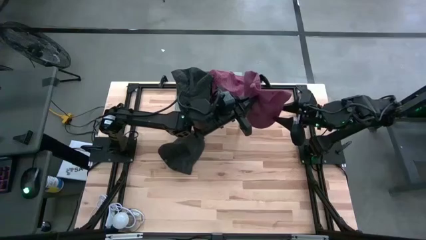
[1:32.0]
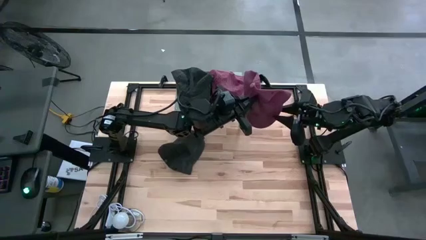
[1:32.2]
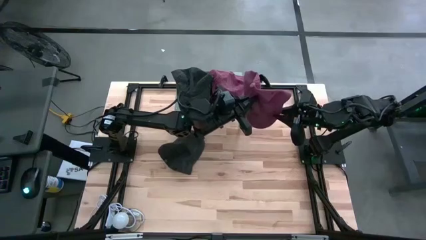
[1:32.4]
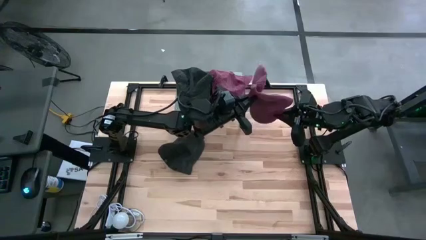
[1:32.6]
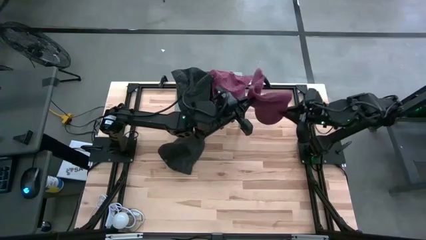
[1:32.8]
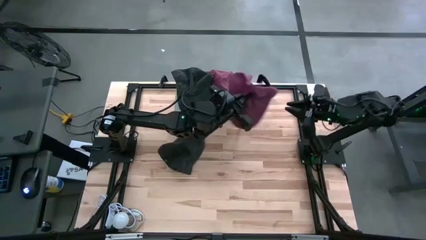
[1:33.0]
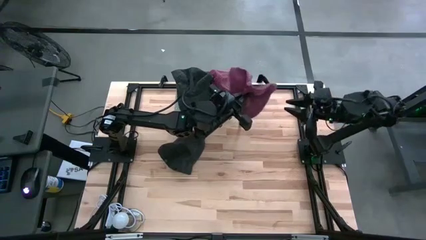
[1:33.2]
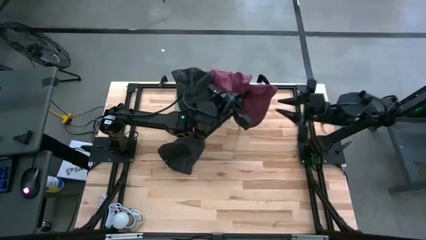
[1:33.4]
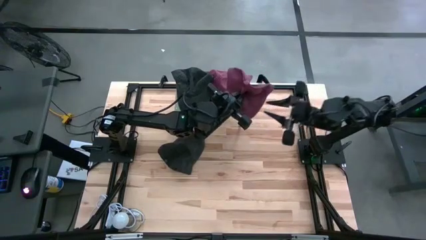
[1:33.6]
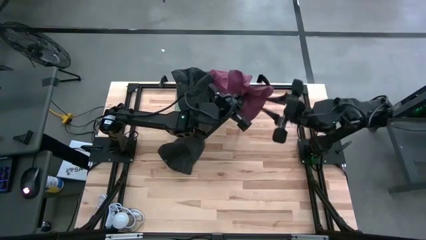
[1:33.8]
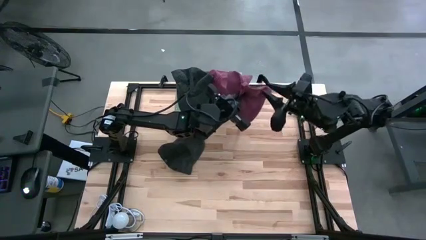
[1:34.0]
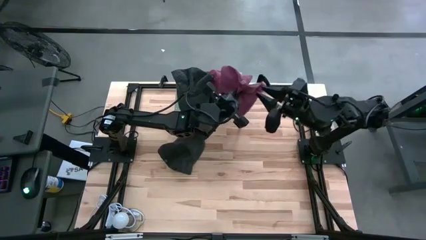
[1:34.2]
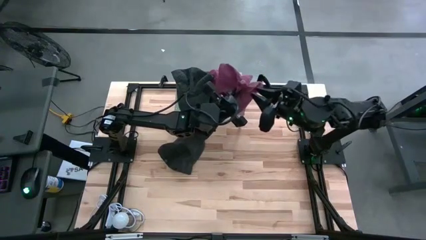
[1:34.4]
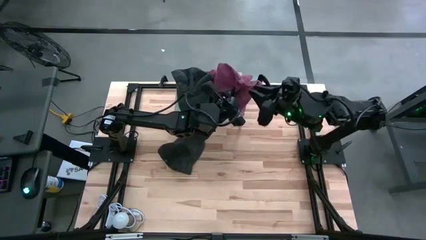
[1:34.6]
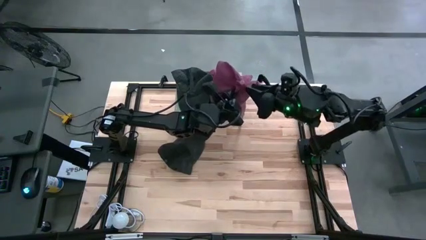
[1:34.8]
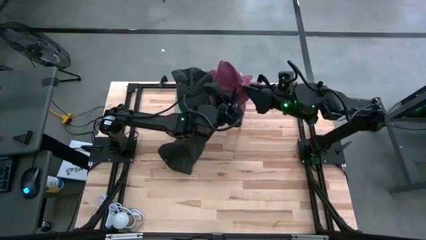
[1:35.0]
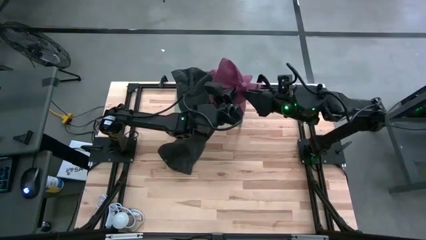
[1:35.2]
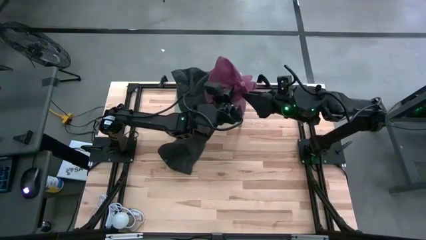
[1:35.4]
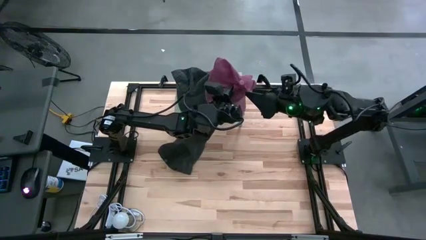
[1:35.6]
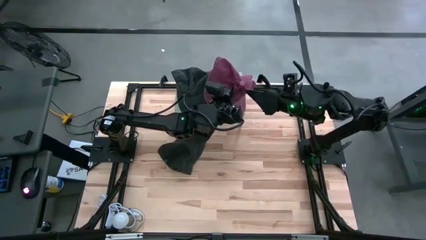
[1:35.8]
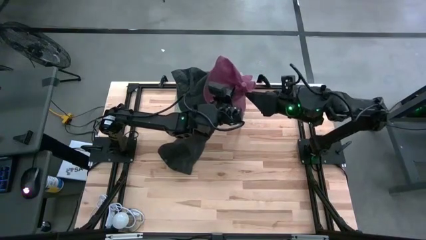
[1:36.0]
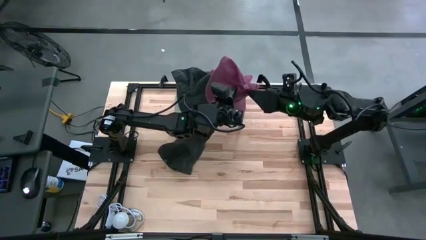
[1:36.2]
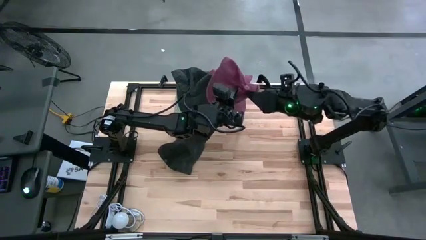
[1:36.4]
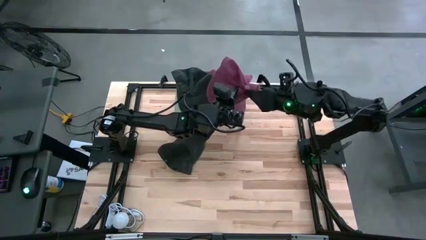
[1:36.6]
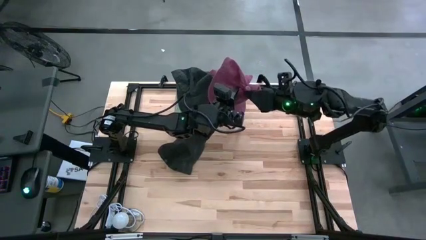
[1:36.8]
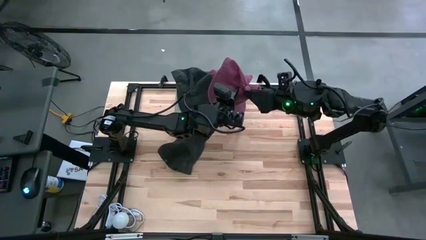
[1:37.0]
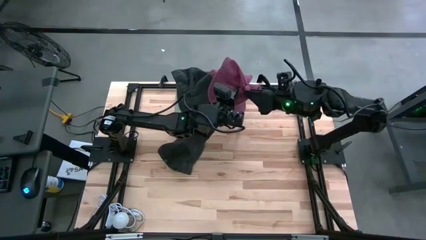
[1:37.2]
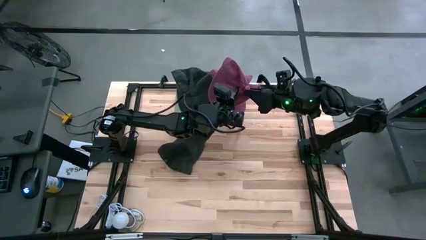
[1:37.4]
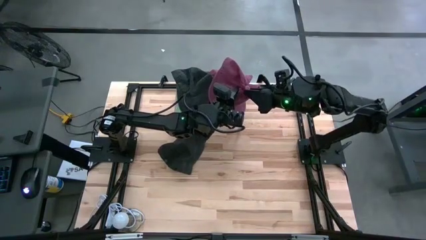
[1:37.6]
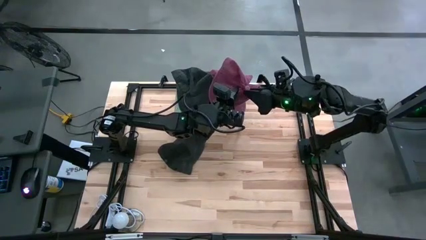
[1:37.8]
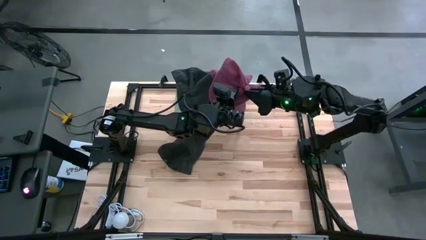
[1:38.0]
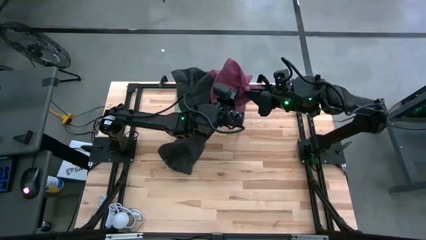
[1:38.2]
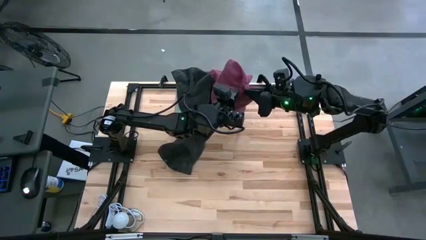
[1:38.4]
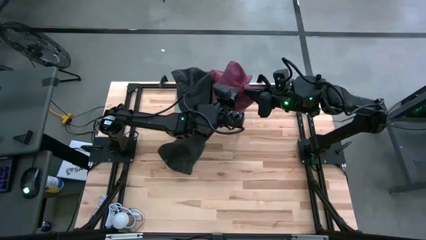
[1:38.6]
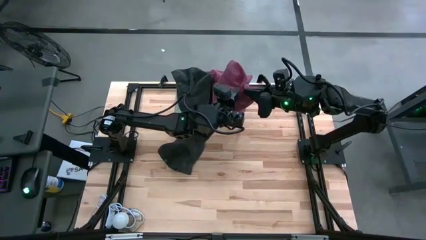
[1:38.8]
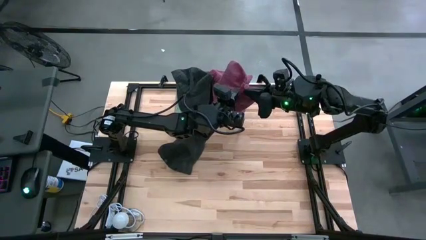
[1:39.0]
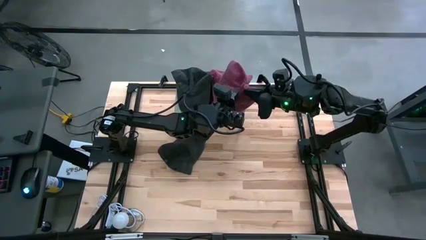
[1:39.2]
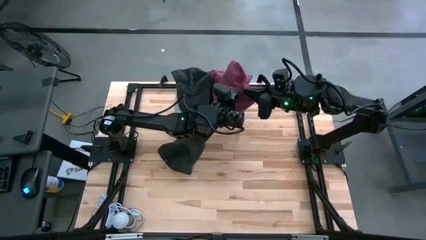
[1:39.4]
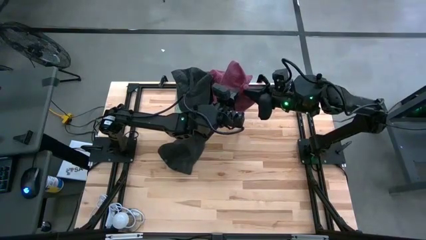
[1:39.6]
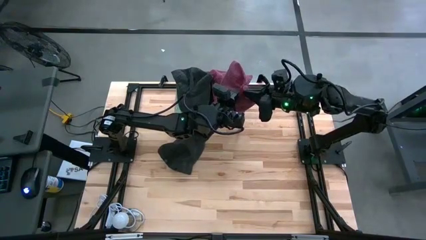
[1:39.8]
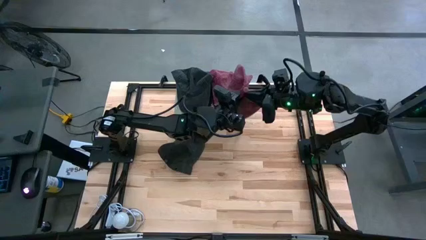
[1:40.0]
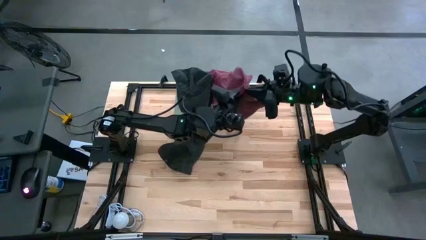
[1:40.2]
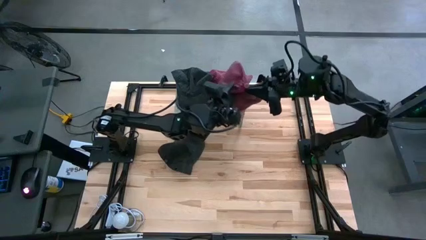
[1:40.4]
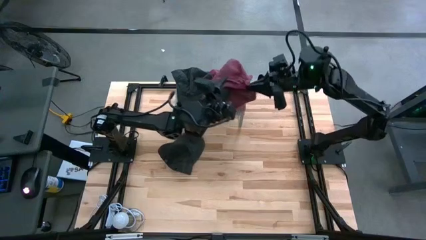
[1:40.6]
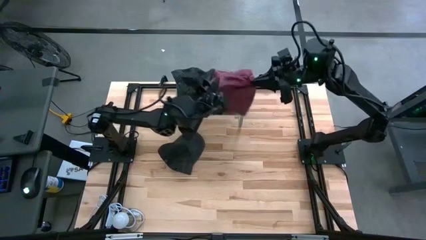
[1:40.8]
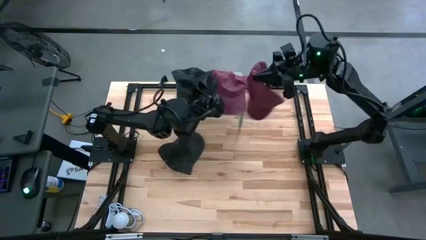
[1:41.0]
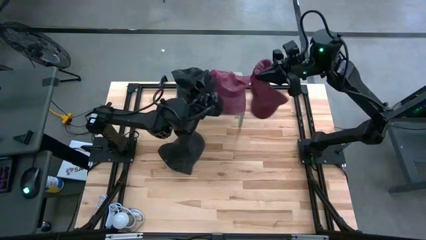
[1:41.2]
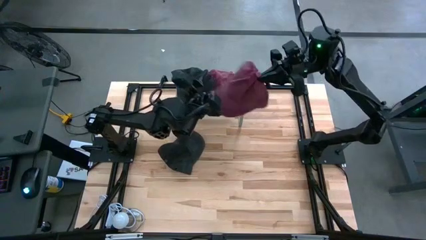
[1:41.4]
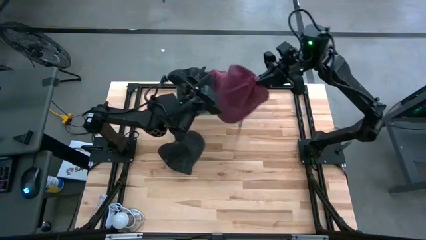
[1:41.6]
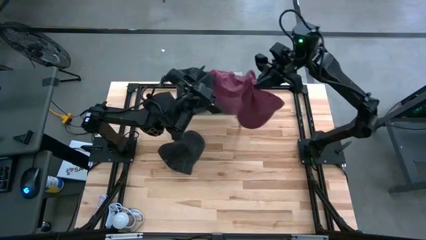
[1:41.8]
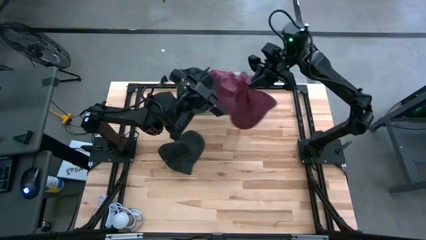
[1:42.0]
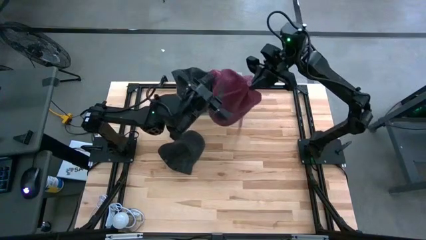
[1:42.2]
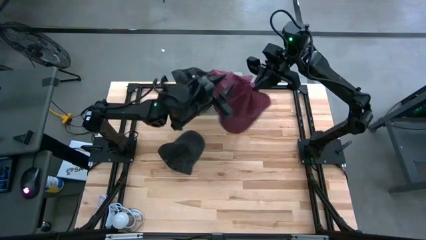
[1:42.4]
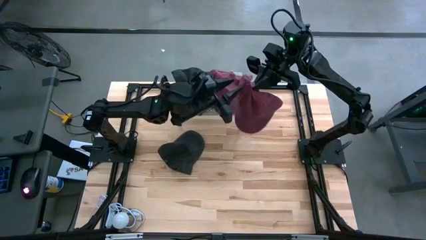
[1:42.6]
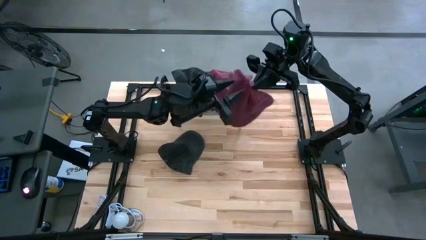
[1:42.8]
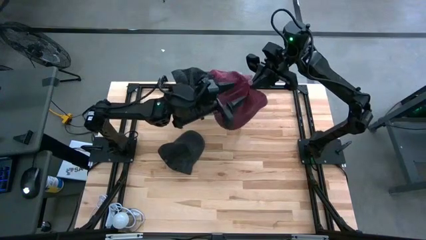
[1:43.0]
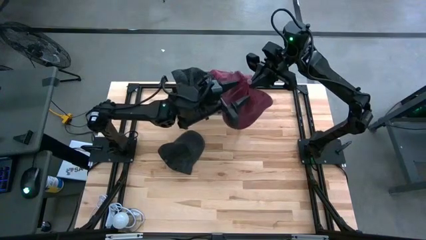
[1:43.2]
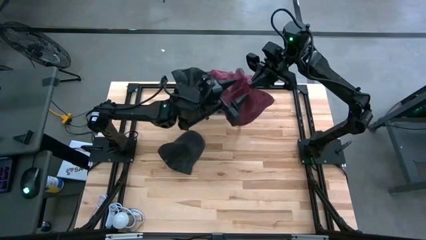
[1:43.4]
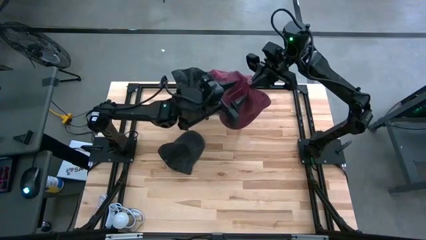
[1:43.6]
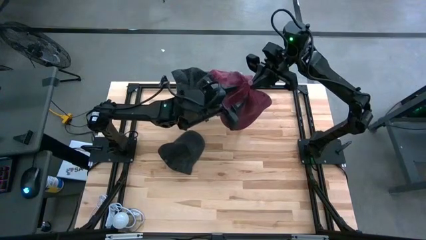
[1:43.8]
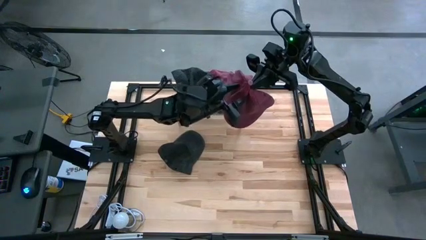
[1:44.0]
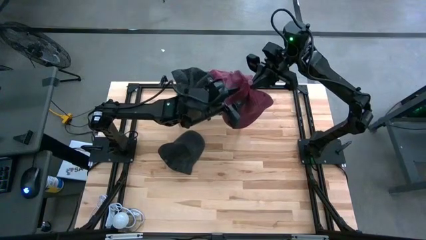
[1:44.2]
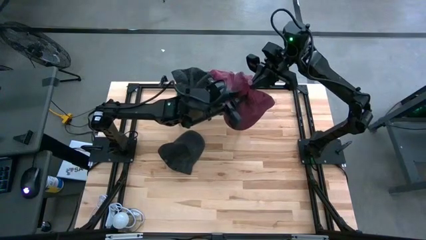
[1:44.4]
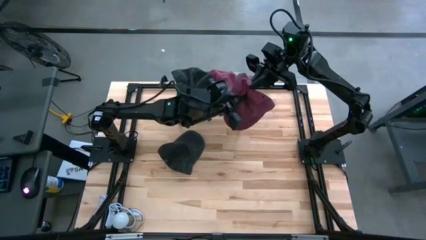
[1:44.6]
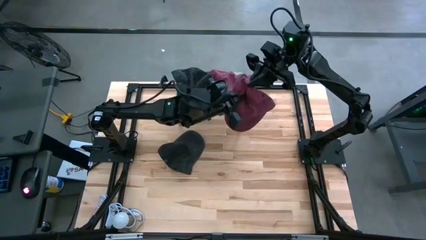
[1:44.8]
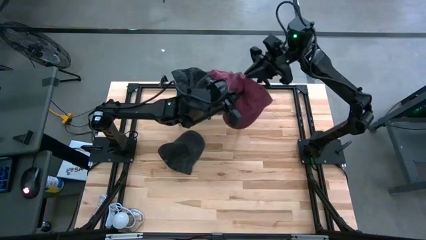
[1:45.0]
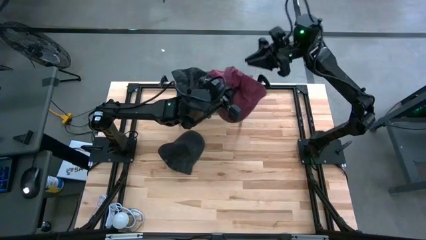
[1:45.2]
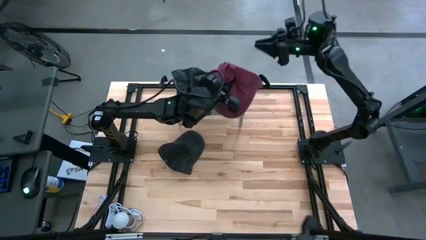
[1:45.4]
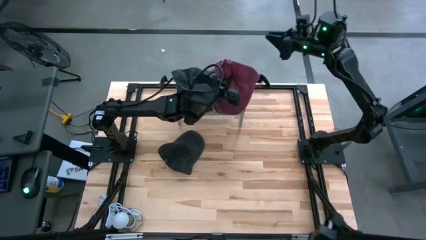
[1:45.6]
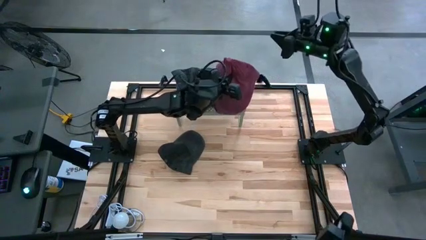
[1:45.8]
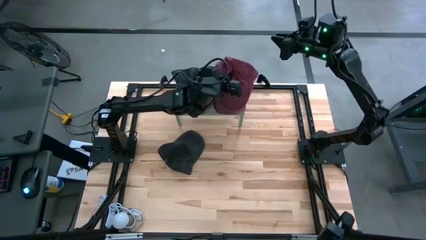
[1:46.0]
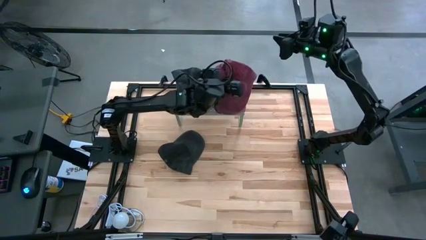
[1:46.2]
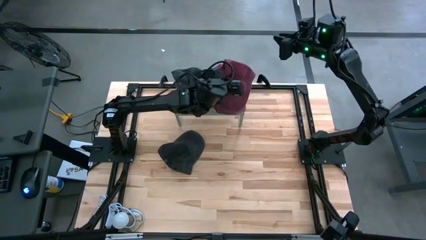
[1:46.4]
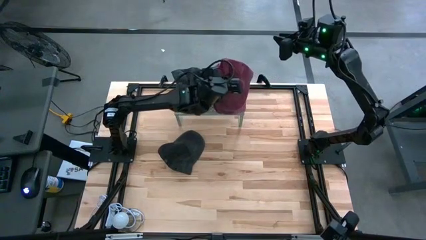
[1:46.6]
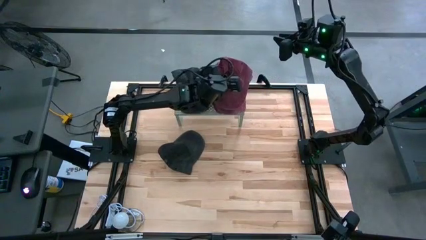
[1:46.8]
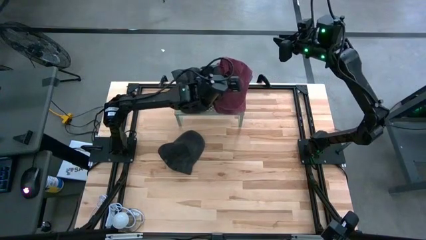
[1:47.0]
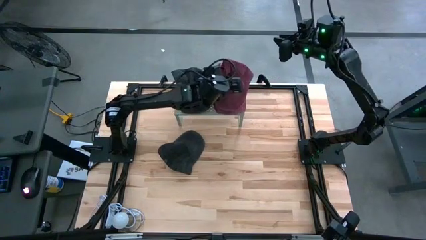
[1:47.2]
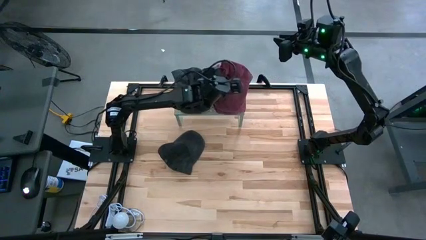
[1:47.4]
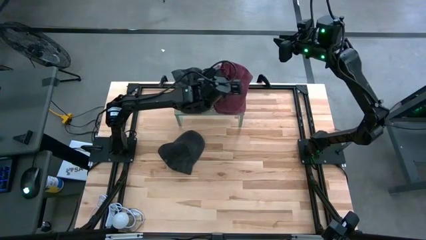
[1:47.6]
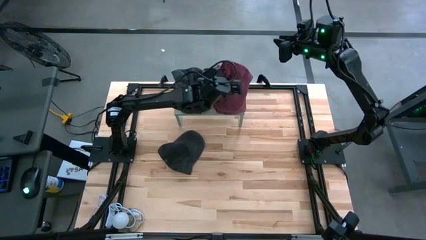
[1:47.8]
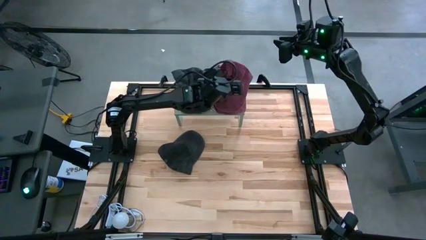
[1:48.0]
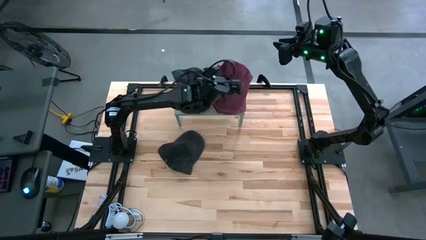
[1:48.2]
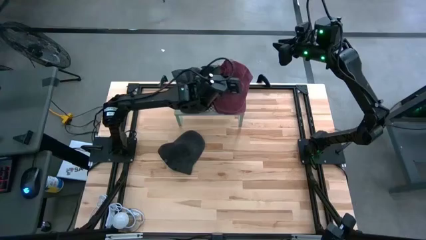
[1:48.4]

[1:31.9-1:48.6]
Task: Pick & Place hat
Stack the red cap on the red caps on the shelf

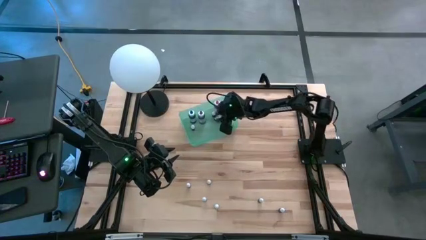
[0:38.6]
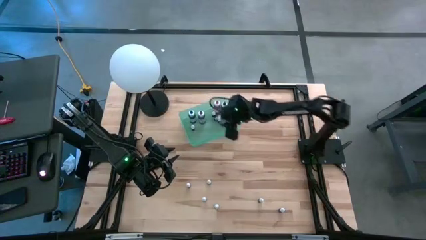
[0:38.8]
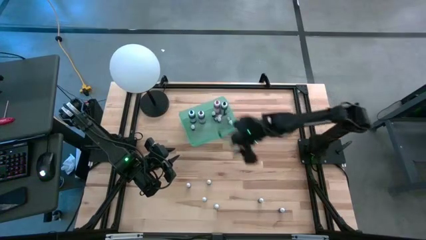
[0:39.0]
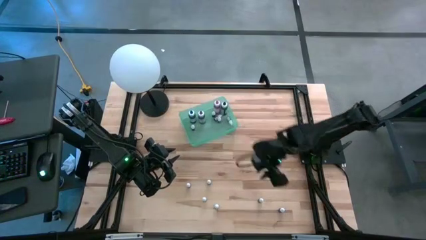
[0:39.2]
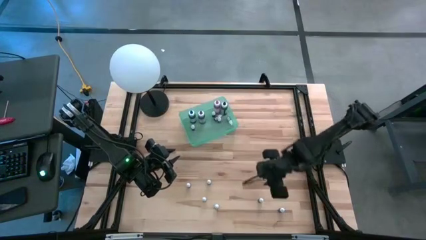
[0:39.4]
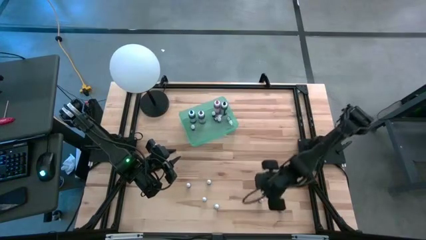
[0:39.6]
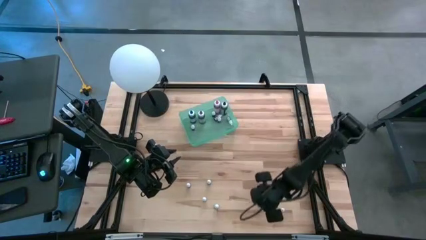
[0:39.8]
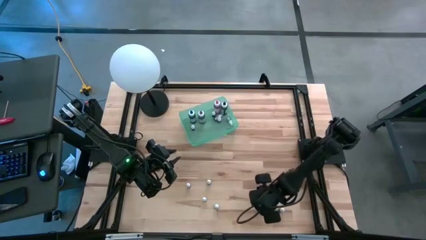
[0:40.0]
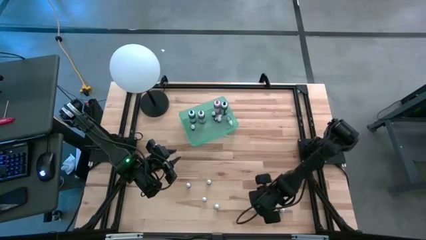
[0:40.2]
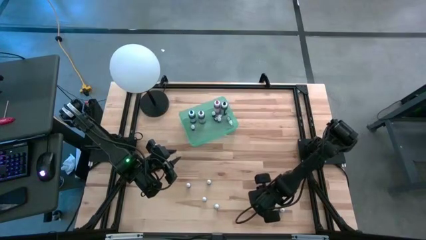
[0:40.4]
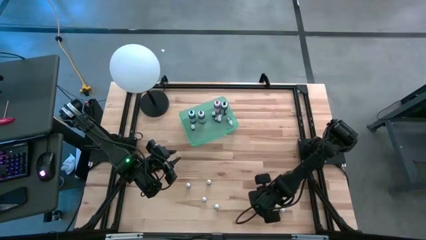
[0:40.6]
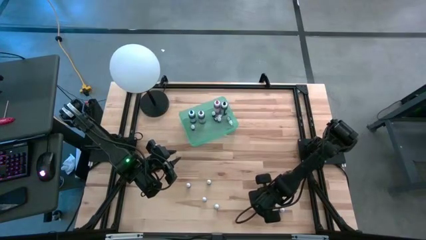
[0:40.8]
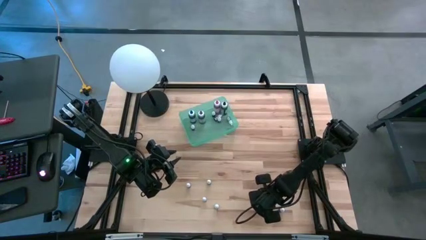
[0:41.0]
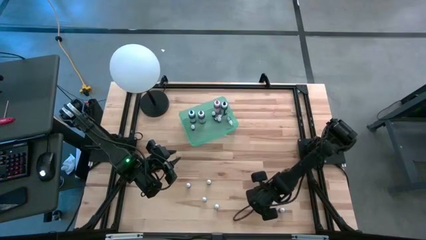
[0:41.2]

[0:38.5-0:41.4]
Task: Pick & Place food coloring
Put the small dark brown bottle into the blue bin
